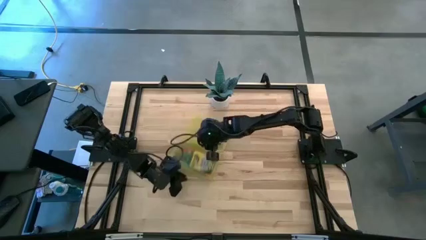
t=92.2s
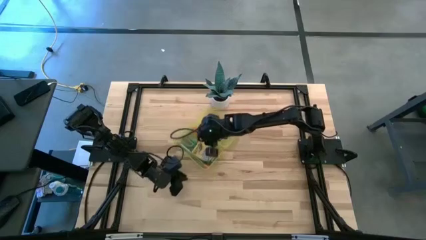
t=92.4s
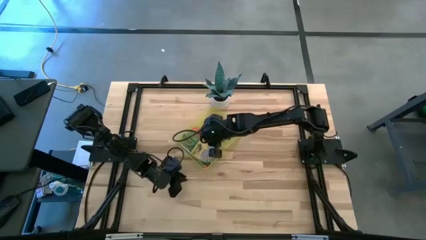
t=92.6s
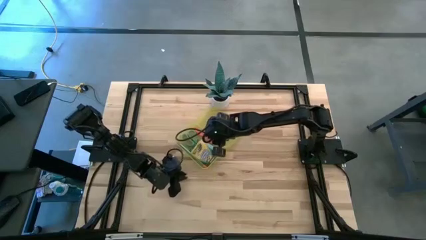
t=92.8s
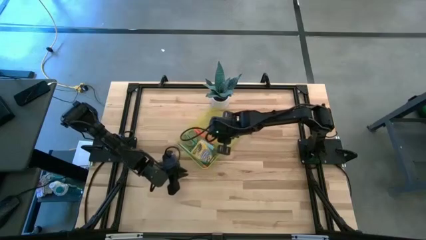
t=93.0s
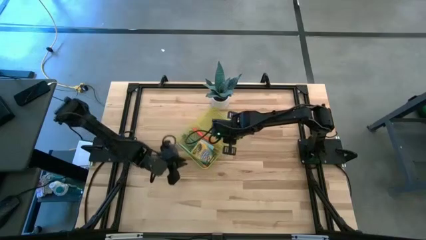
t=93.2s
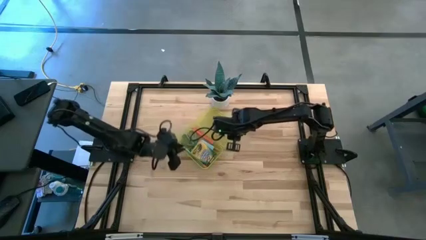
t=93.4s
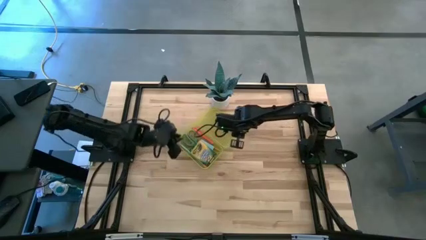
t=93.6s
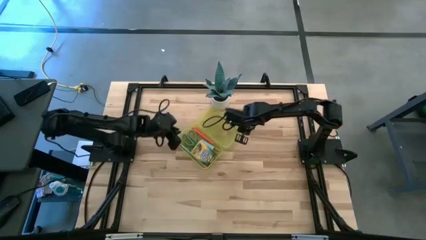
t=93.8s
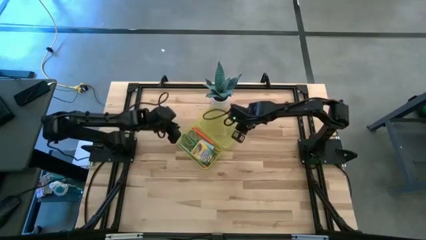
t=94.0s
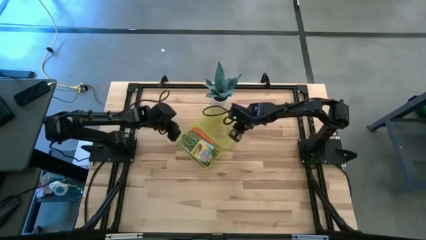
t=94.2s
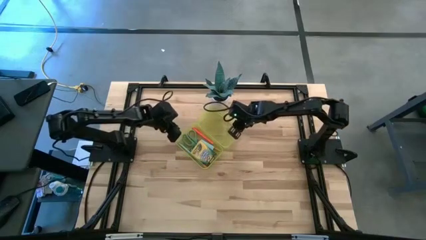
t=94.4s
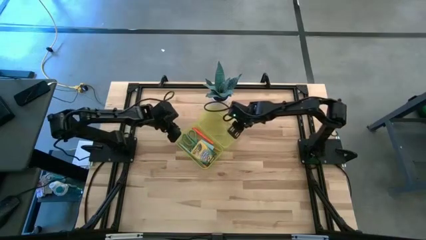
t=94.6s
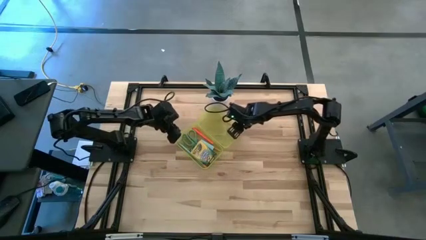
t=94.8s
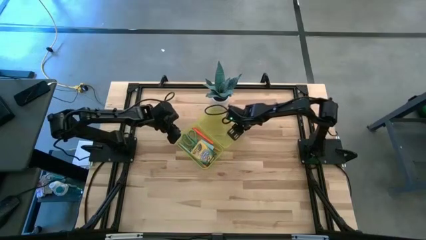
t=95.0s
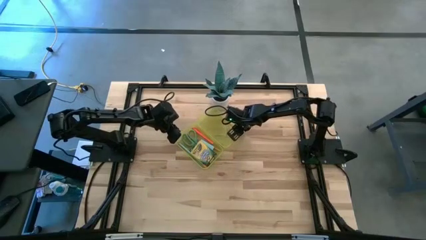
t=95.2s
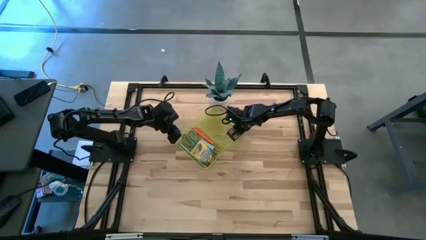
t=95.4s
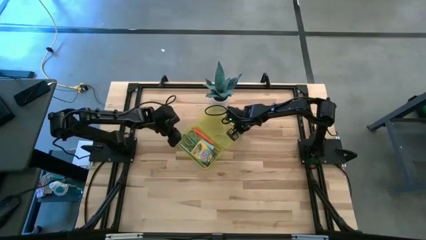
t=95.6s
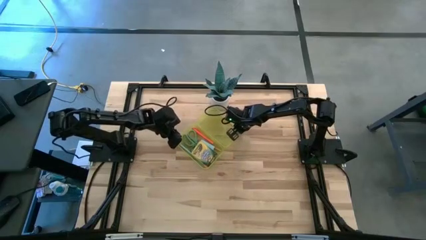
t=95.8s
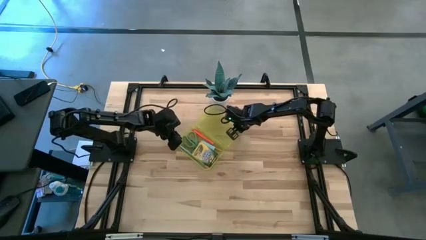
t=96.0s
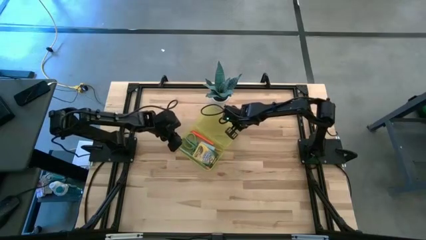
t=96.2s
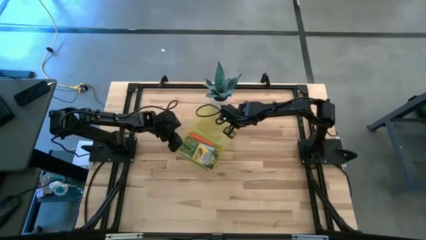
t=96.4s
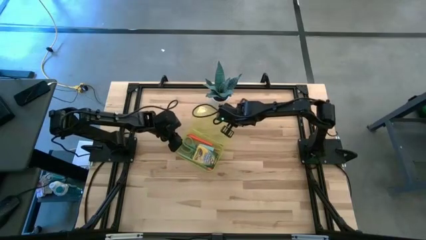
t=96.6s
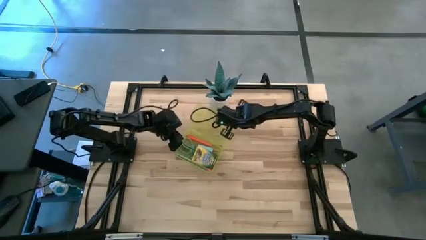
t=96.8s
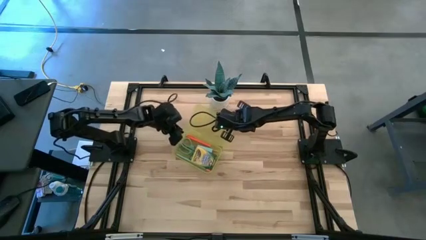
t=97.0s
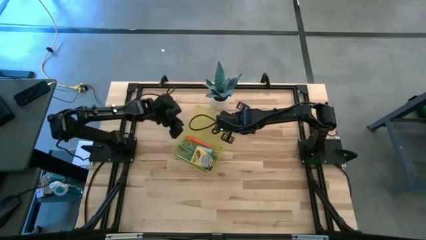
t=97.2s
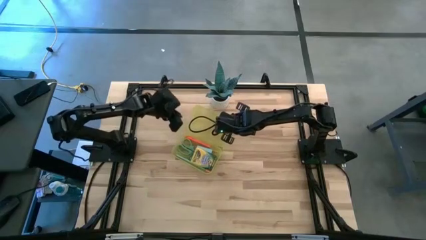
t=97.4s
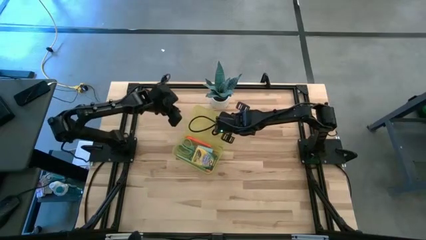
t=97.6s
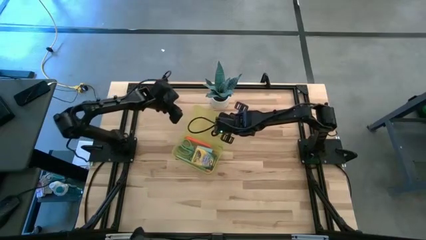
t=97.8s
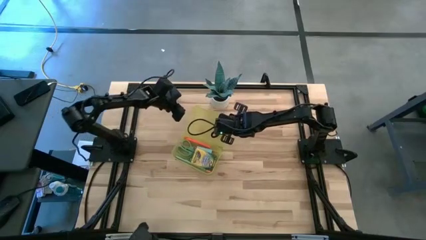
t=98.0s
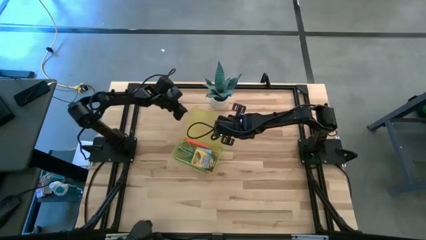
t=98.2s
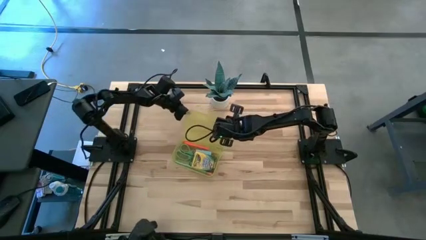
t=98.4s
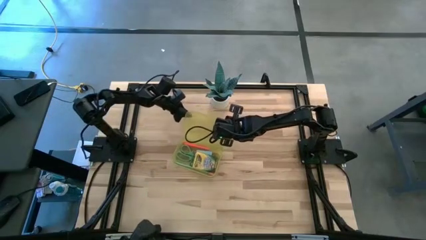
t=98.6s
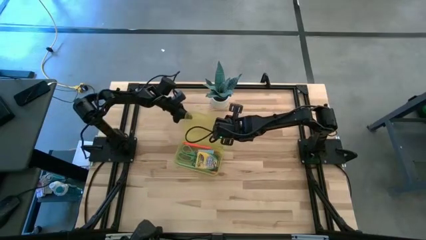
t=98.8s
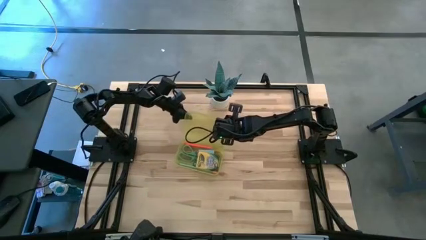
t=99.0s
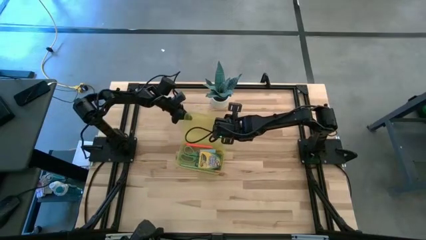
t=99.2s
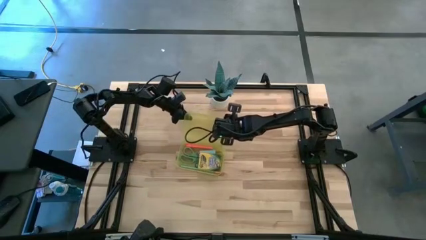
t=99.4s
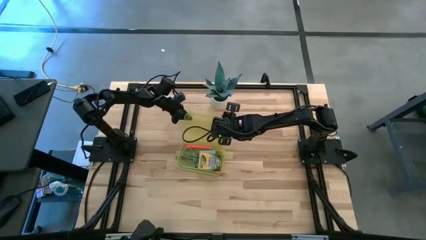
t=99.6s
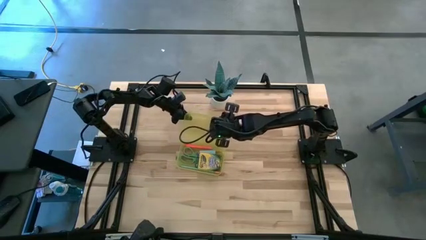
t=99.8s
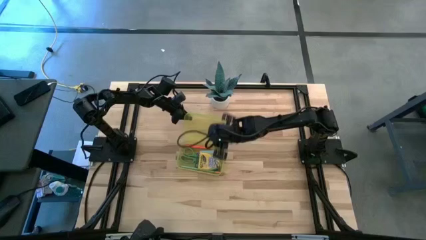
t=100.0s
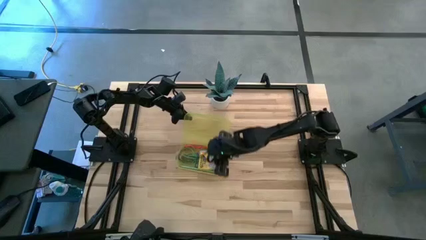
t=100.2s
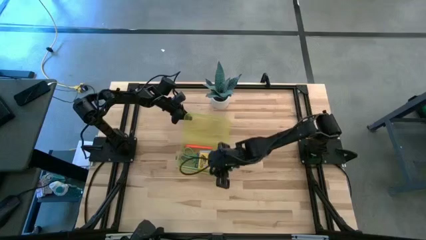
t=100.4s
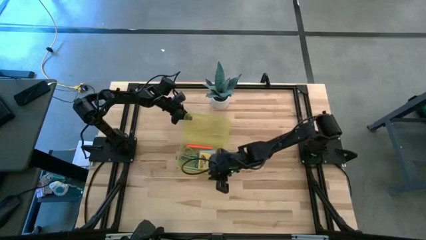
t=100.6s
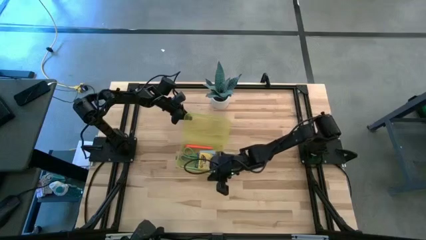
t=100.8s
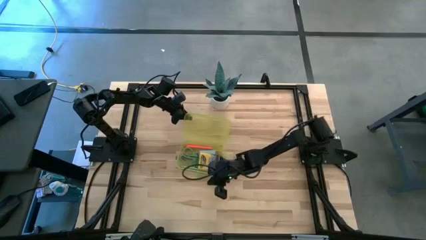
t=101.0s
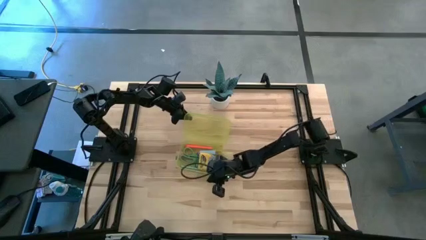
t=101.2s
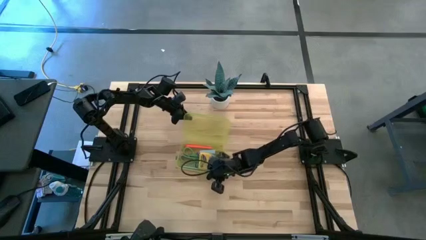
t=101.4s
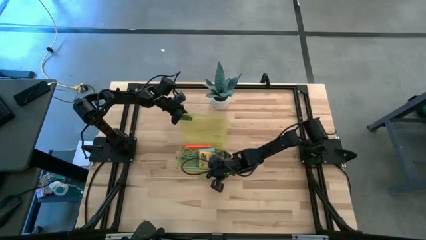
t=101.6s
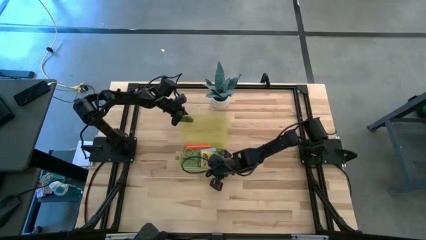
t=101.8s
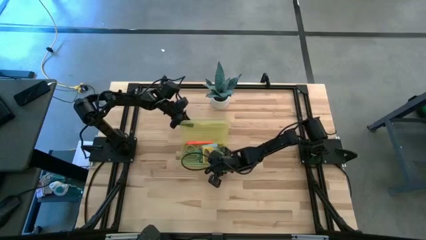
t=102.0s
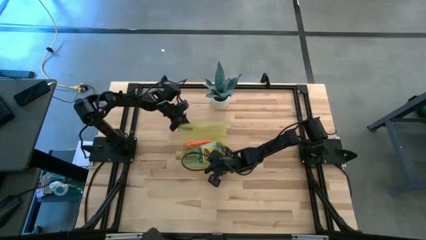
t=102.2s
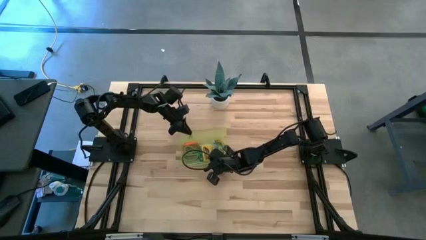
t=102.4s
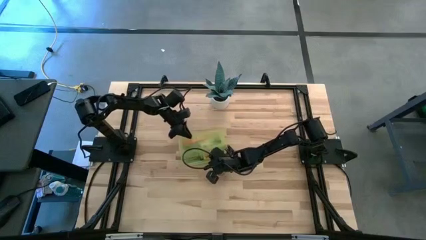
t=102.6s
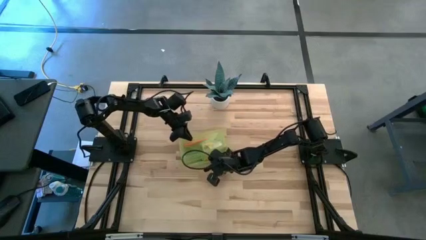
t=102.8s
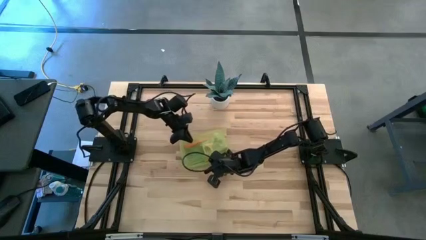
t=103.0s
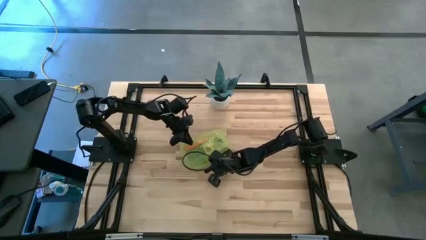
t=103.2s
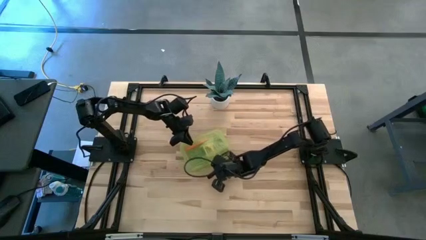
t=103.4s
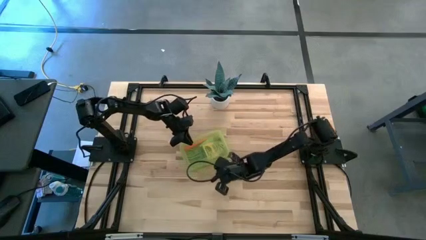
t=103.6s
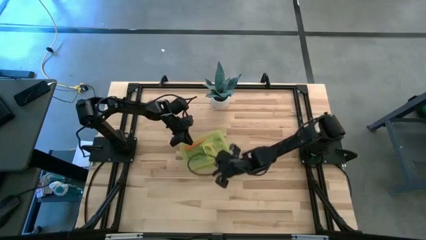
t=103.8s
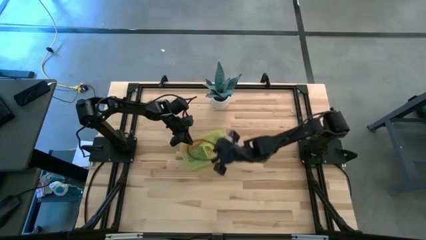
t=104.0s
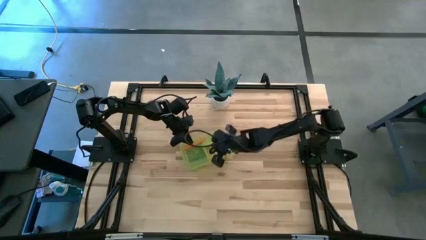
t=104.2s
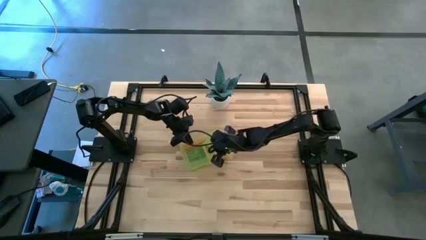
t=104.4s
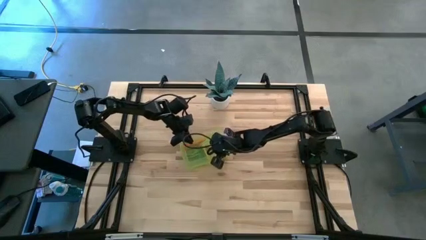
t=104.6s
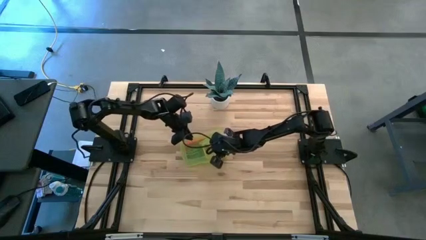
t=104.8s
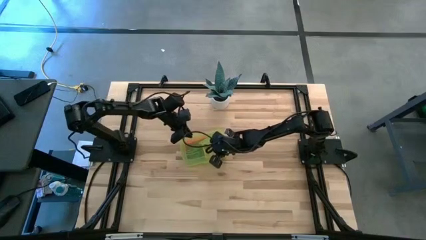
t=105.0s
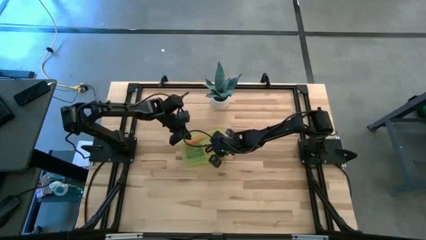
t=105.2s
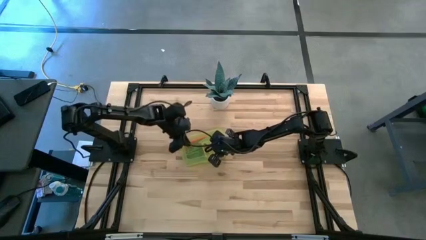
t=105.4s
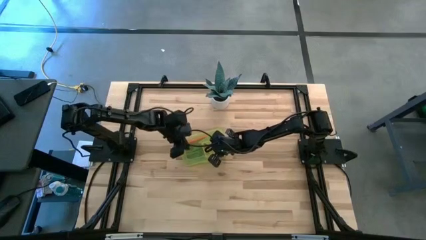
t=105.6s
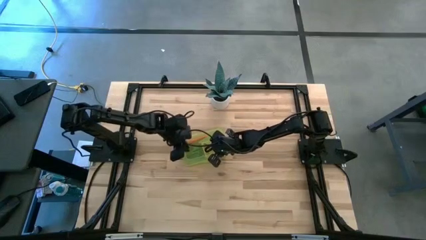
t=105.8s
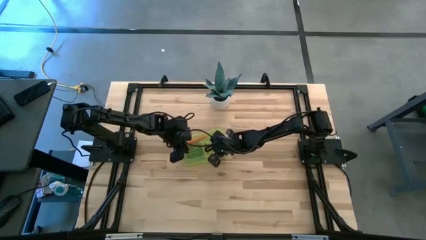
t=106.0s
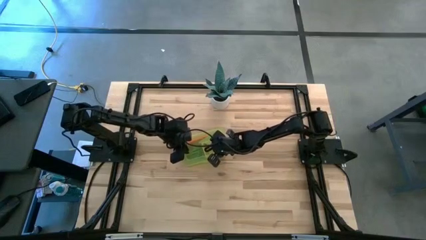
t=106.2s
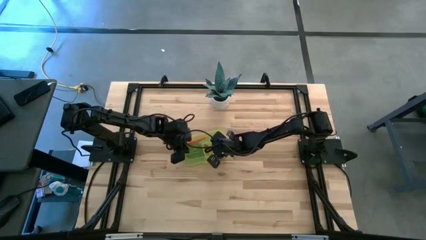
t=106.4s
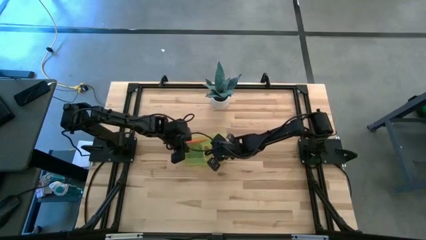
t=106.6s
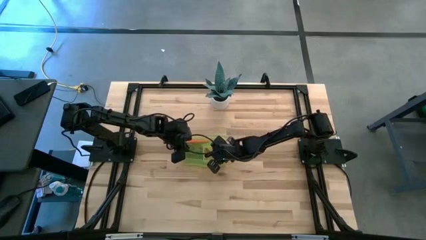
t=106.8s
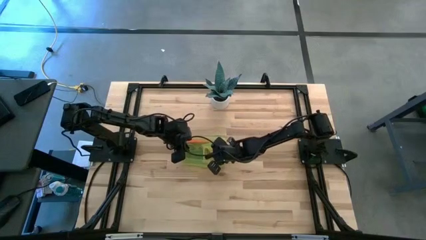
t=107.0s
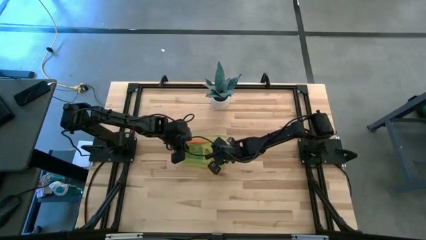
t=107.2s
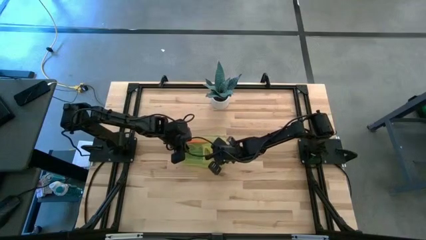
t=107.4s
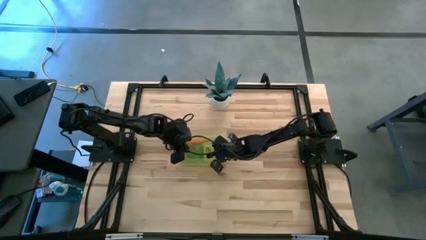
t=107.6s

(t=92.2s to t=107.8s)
Task: Pack school essentials
Close the yellow supply box
